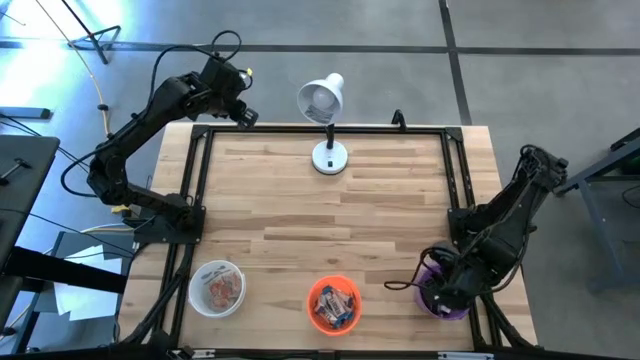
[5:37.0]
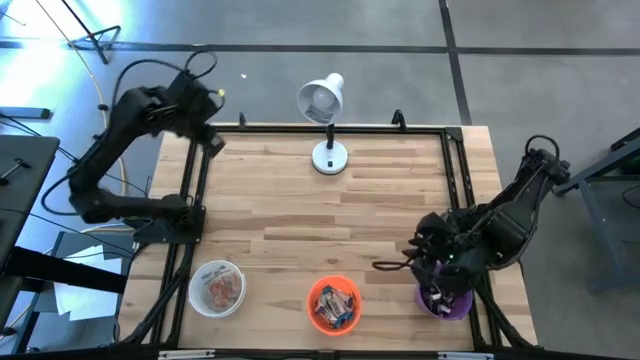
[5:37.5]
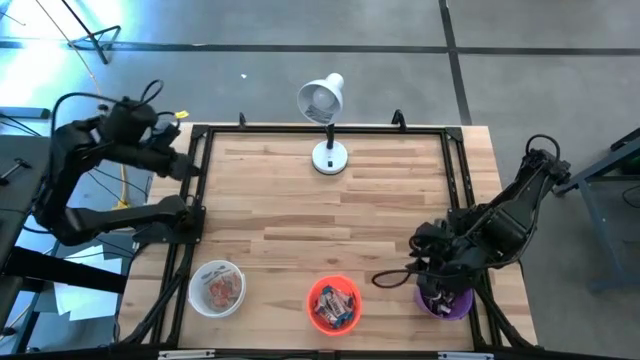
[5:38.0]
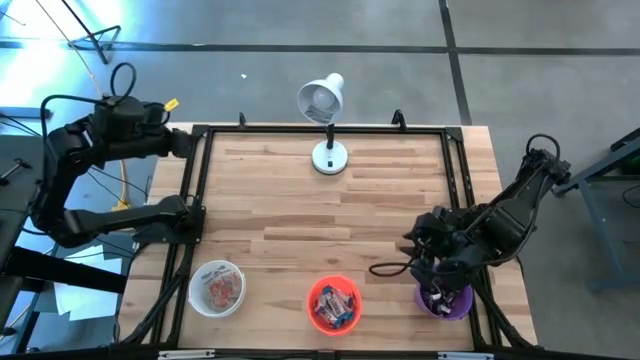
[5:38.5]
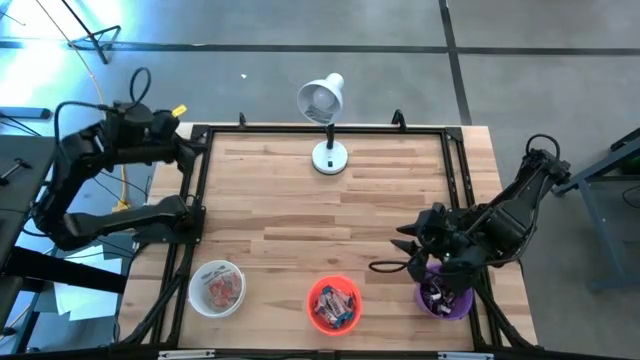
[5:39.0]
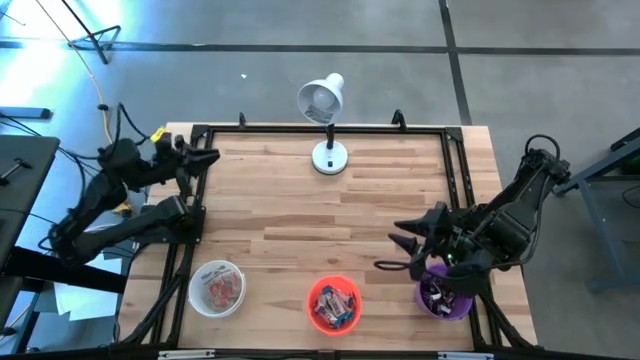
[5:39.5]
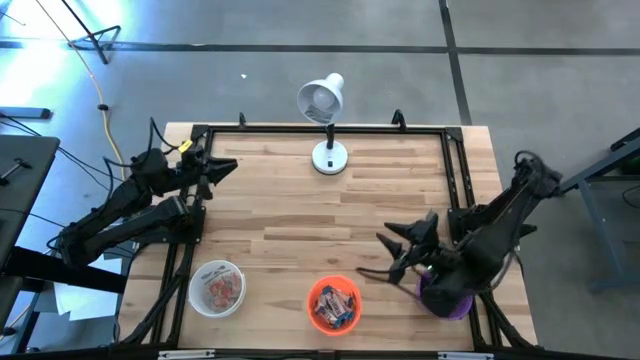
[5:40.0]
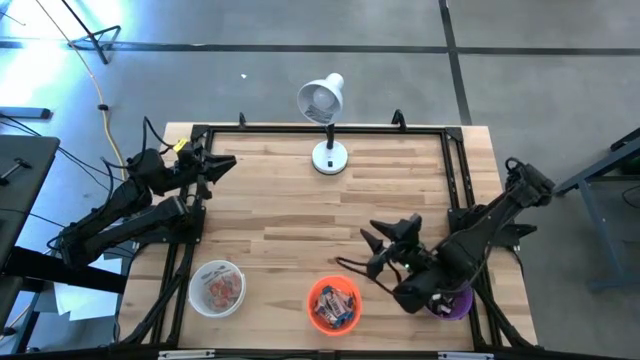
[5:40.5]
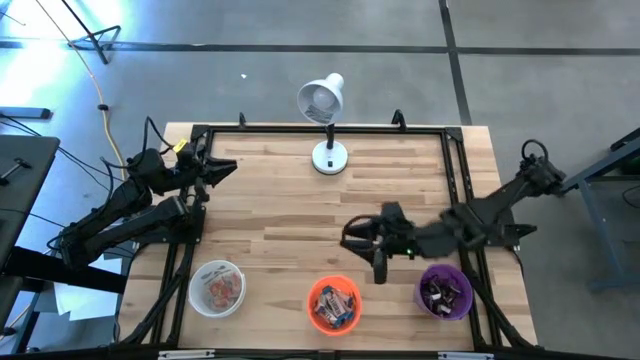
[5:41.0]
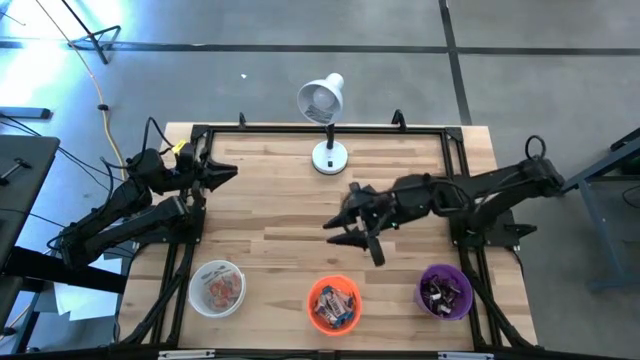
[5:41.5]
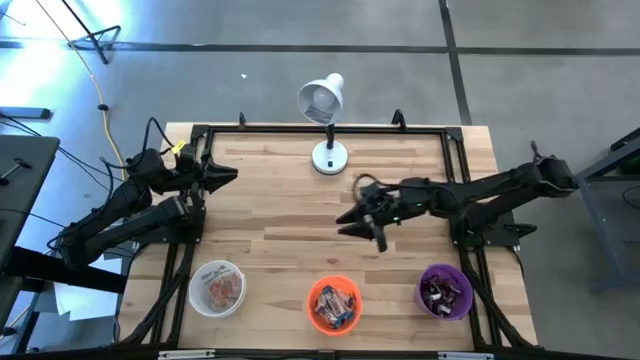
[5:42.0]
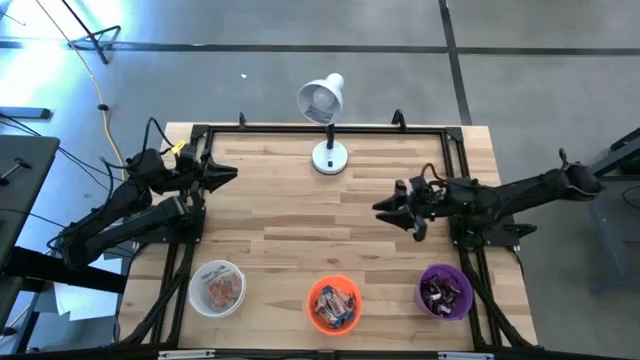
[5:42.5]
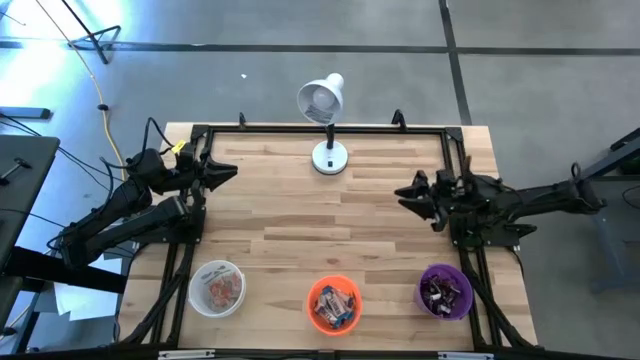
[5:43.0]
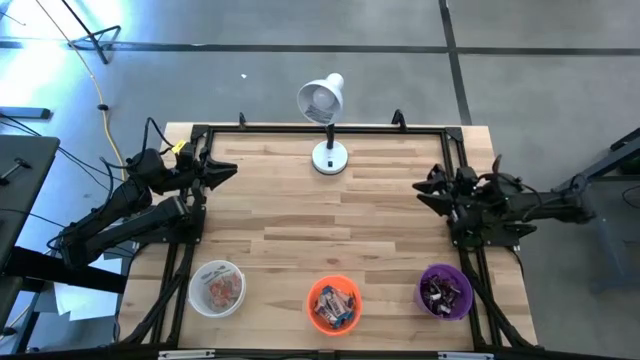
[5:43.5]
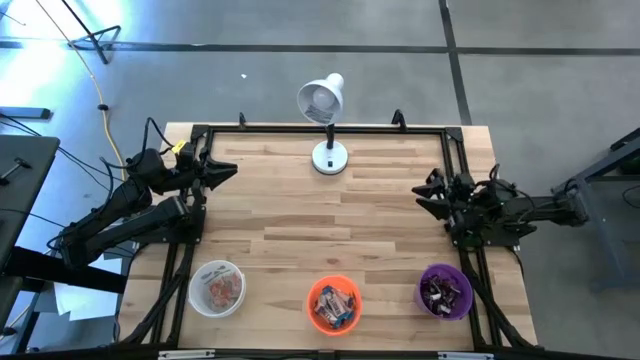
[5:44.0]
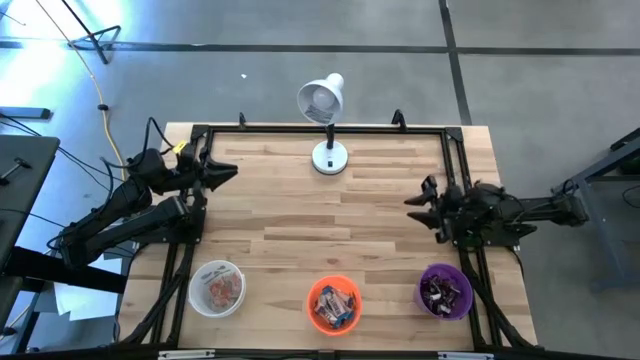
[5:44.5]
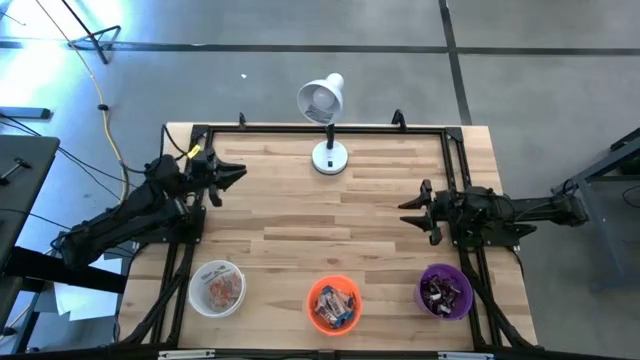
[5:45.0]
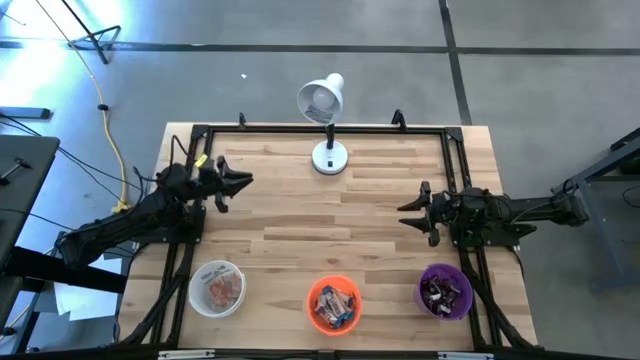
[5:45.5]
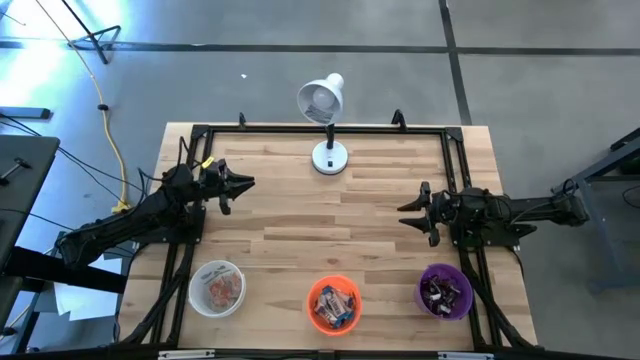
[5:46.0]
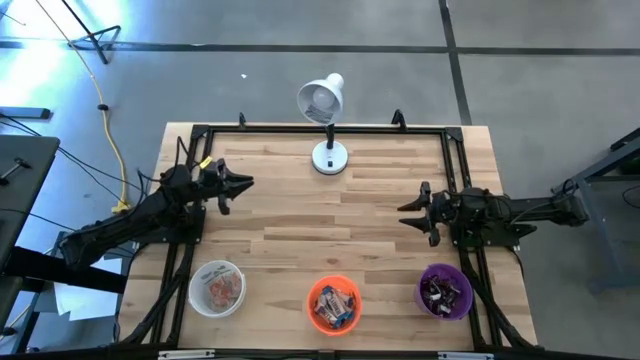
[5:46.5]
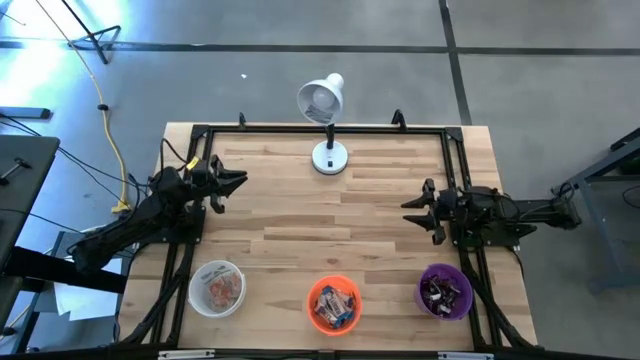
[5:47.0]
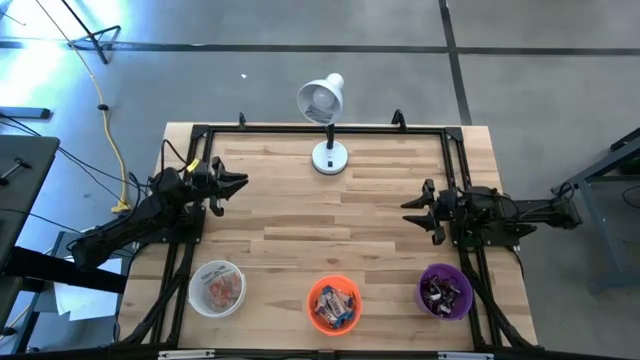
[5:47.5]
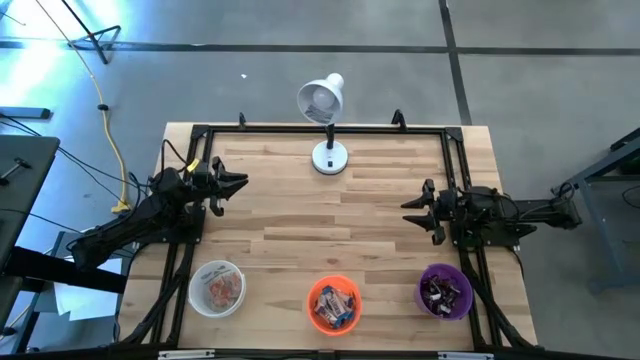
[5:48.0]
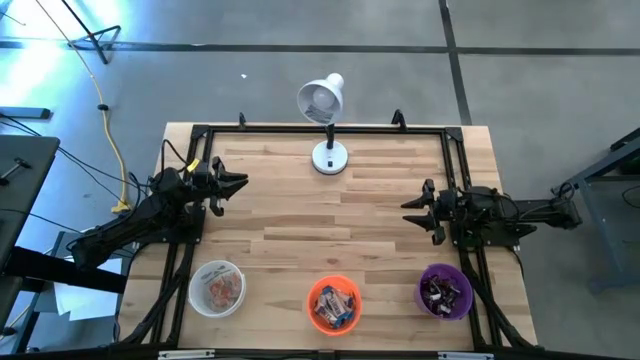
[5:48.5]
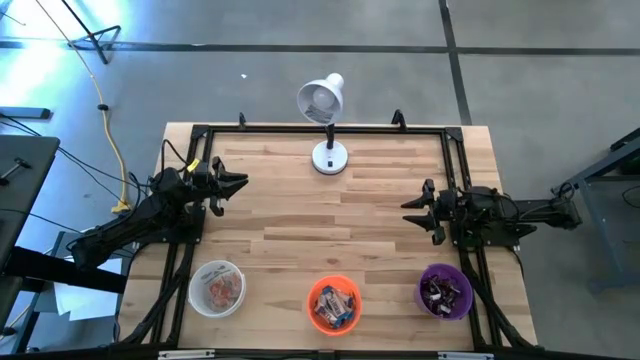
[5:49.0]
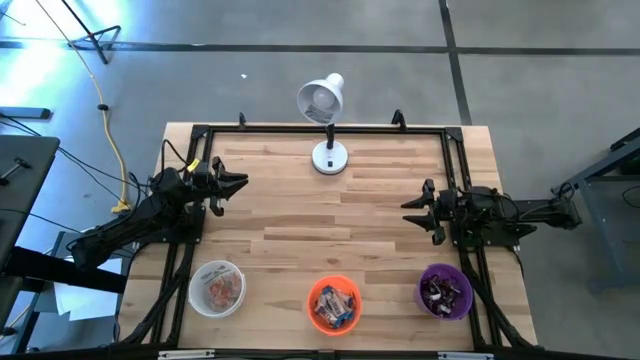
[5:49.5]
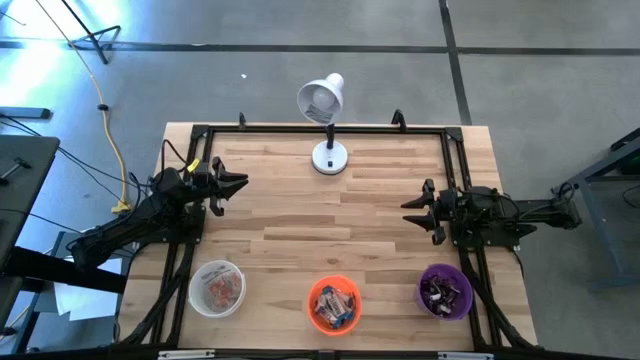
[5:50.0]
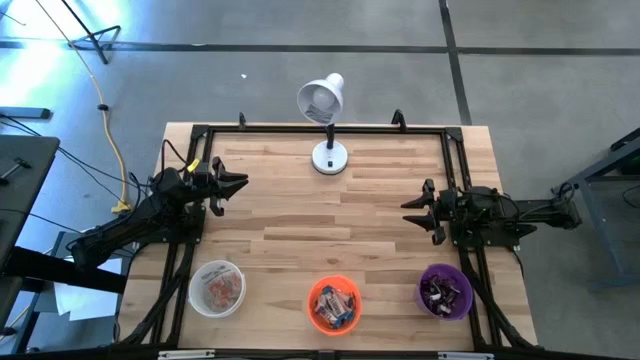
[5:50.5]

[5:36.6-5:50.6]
Task: Organize candy in baskets
Return to Home Position

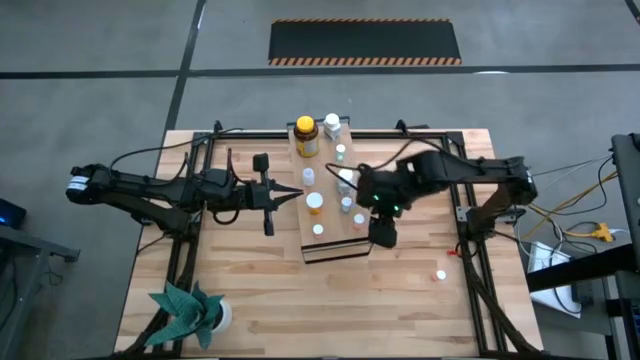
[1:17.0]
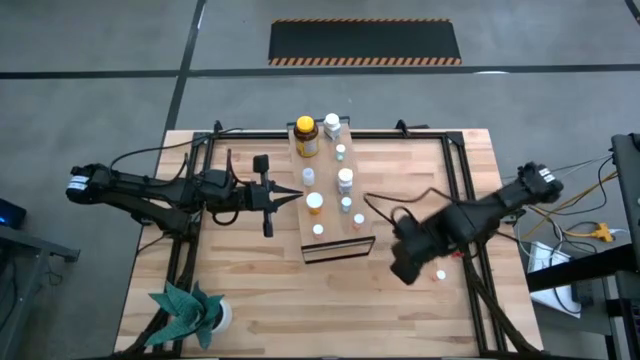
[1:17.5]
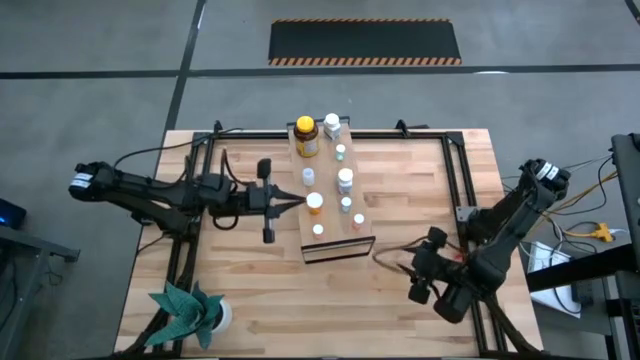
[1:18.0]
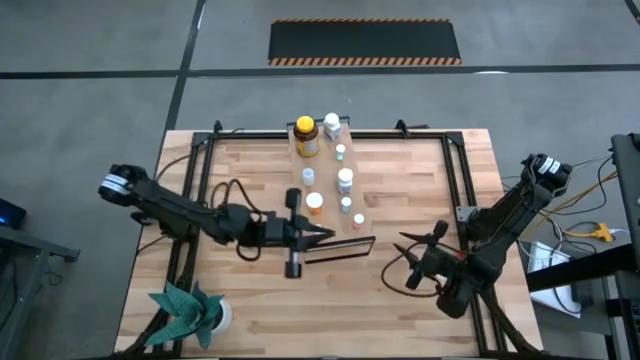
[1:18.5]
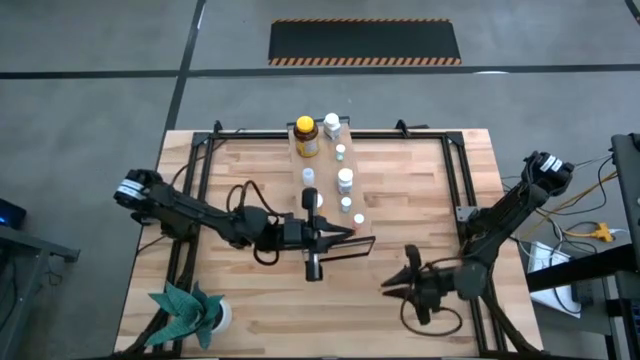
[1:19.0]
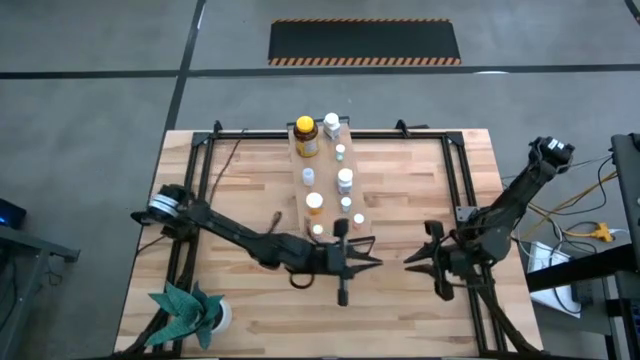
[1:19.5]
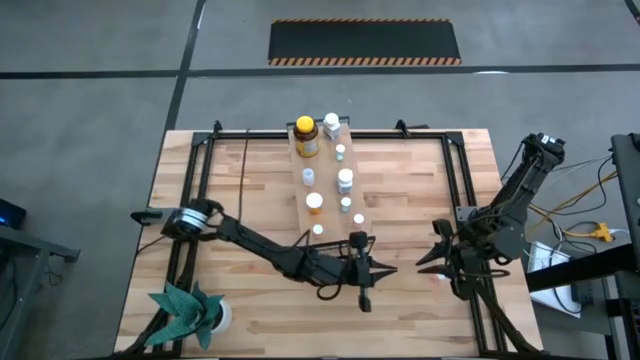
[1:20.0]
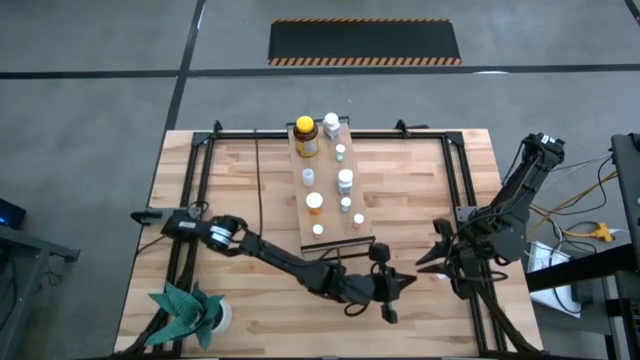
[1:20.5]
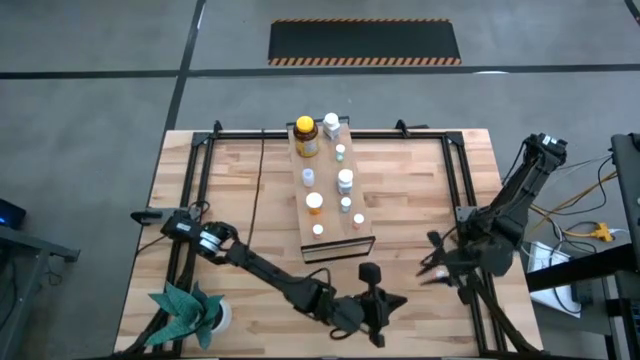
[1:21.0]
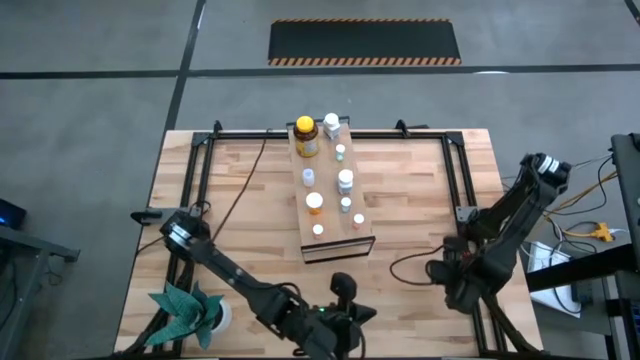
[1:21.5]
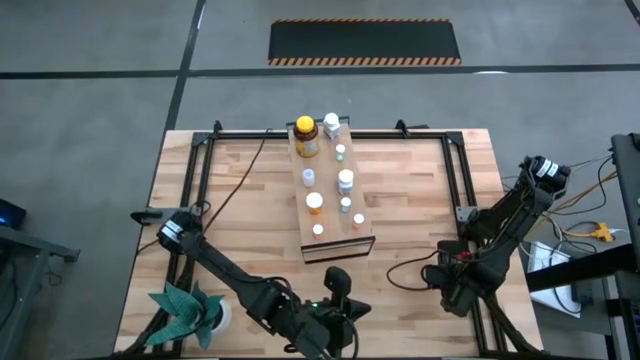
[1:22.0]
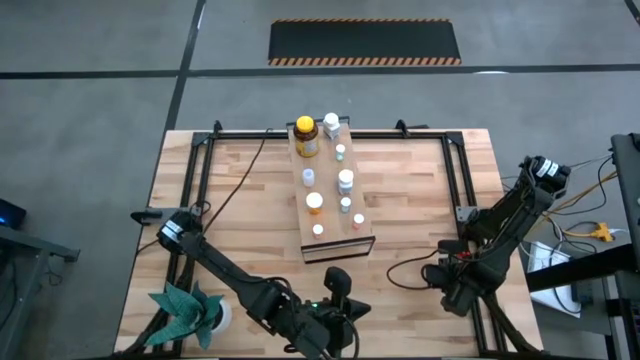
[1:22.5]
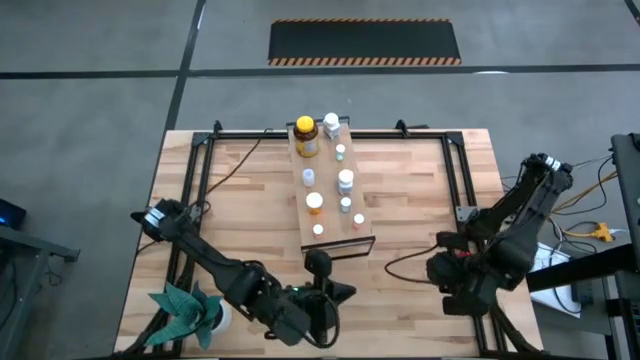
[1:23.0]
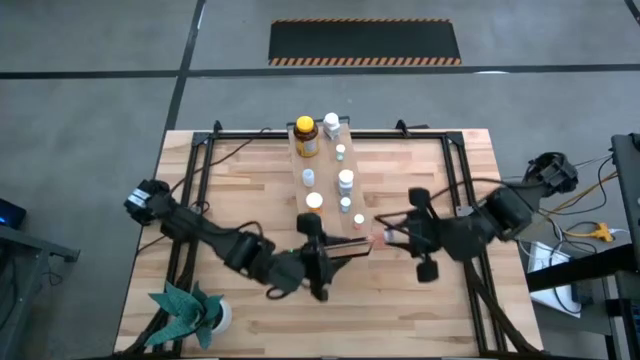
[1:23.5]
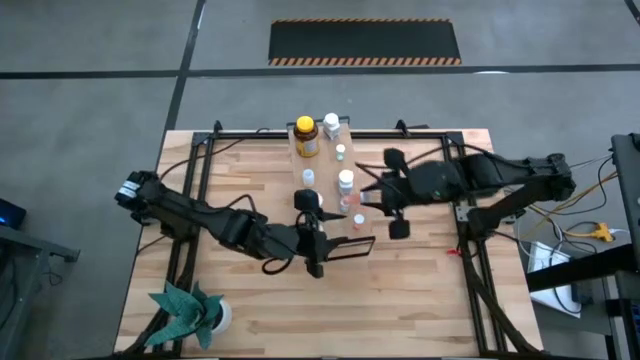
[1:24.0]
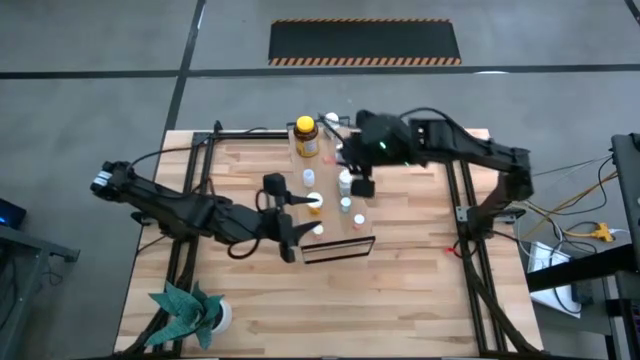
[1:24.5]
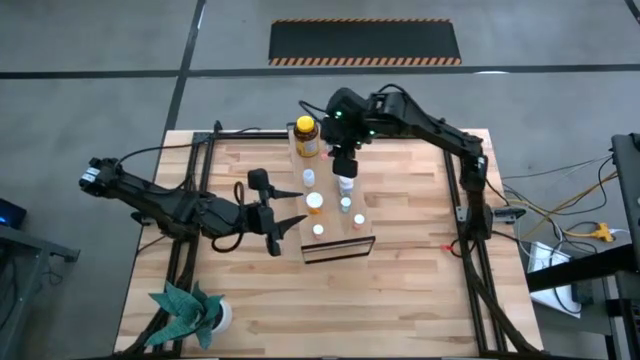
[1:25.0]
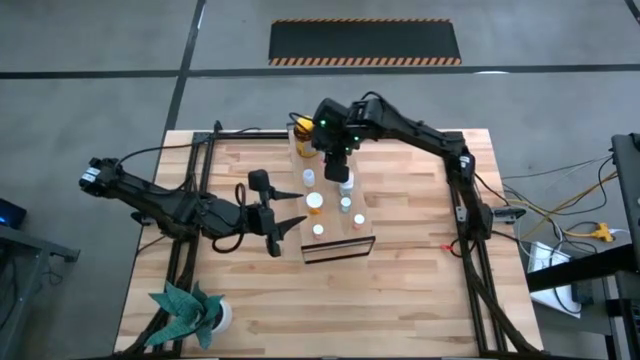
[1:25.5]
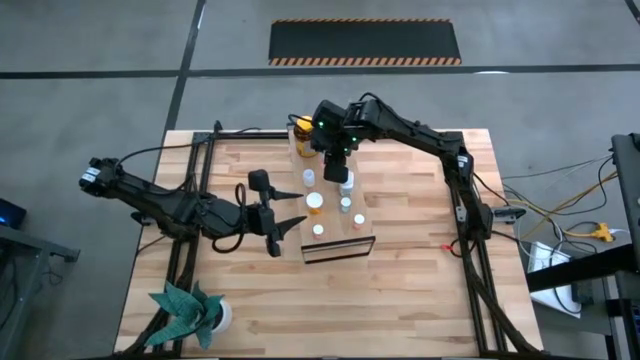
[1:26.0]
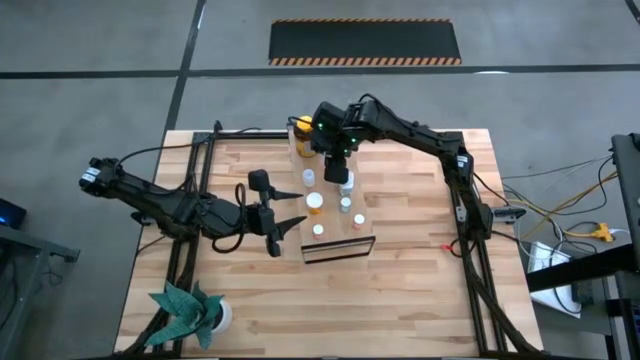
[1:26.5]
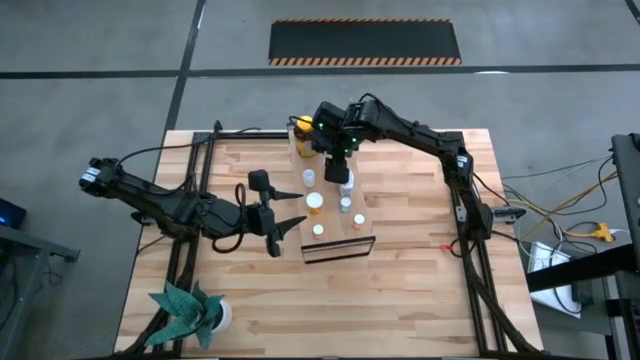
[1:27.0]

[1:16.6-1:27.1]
Task: Pick and place medicine bottles onto shelf by color
Put the pink pill on the shelf
